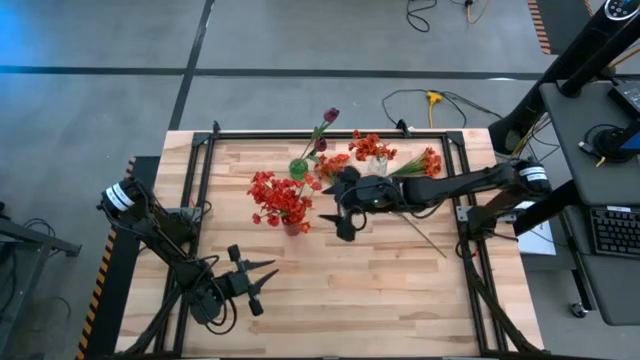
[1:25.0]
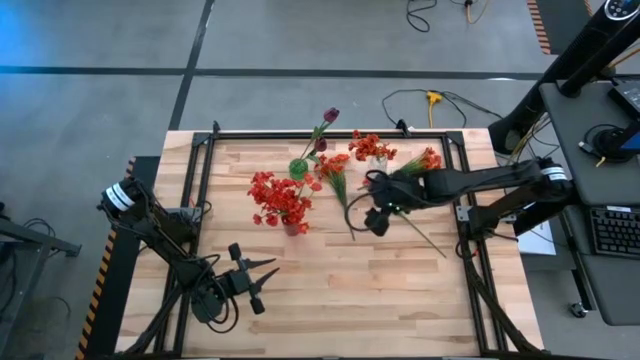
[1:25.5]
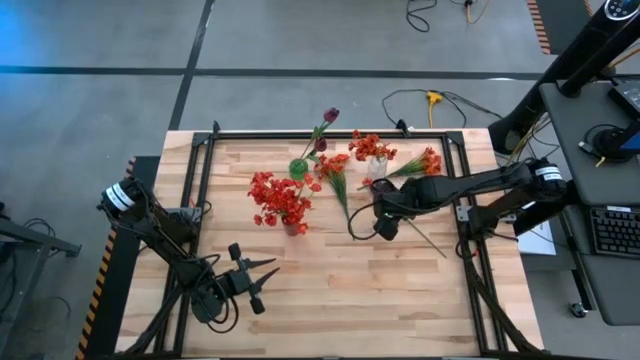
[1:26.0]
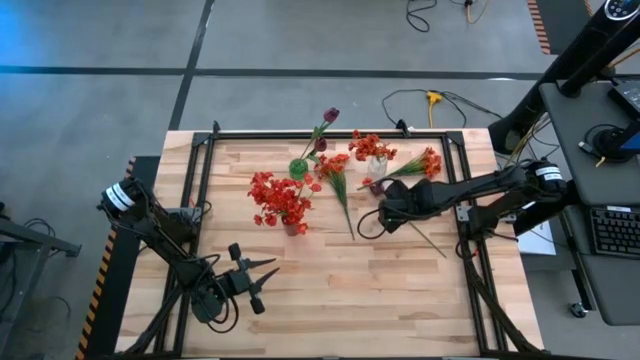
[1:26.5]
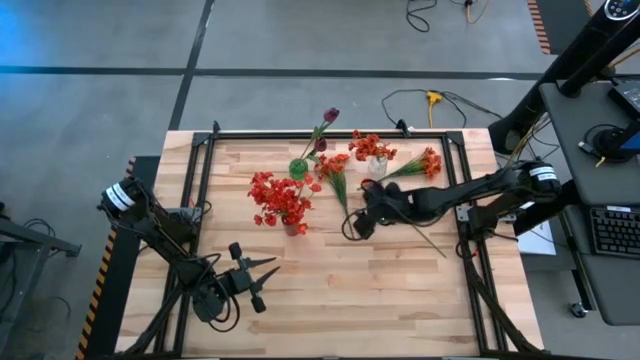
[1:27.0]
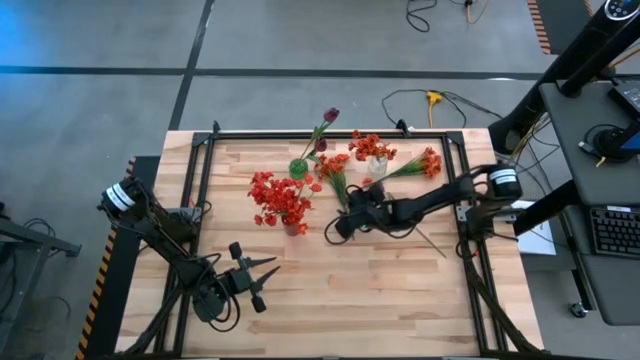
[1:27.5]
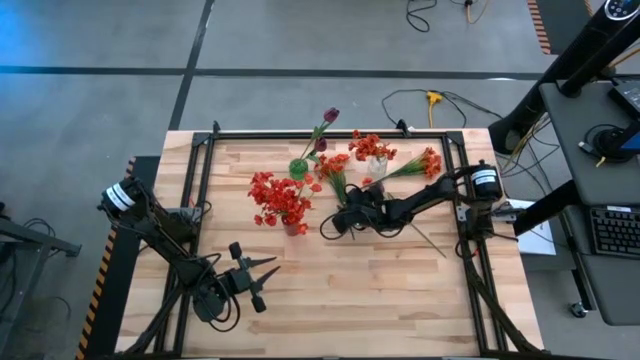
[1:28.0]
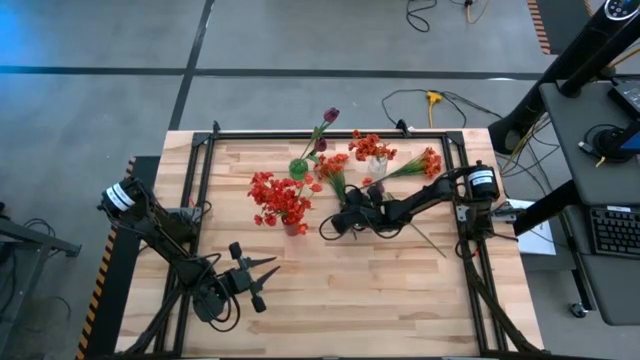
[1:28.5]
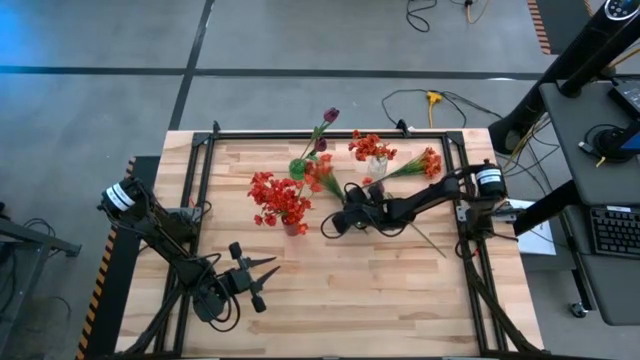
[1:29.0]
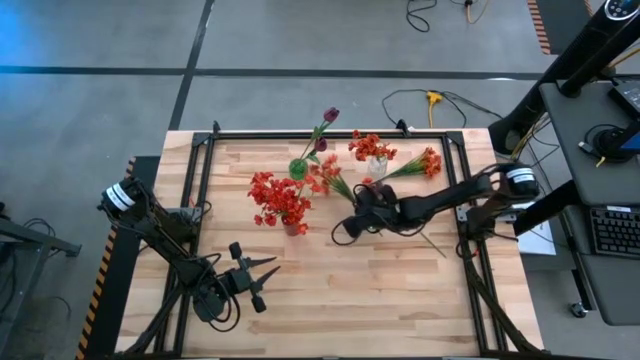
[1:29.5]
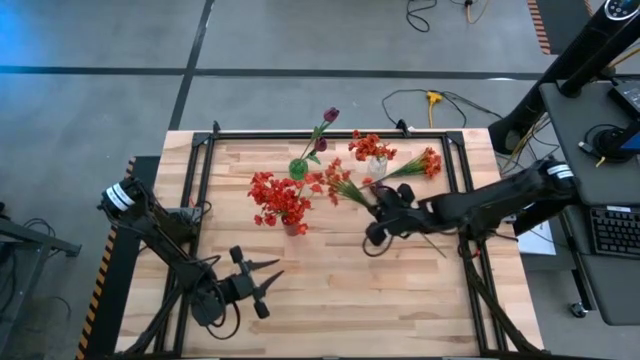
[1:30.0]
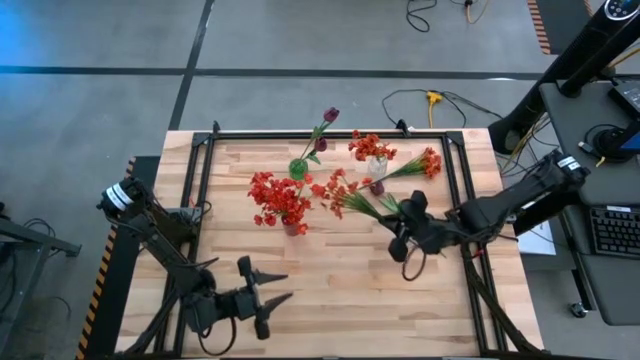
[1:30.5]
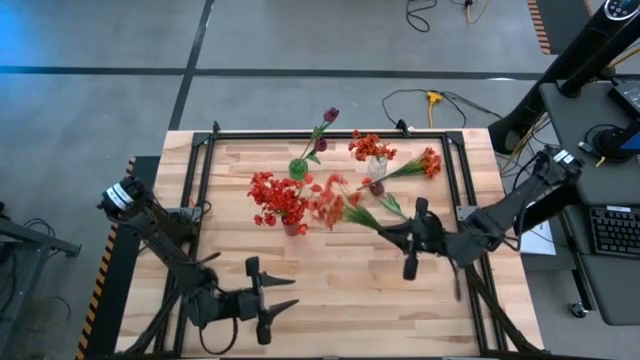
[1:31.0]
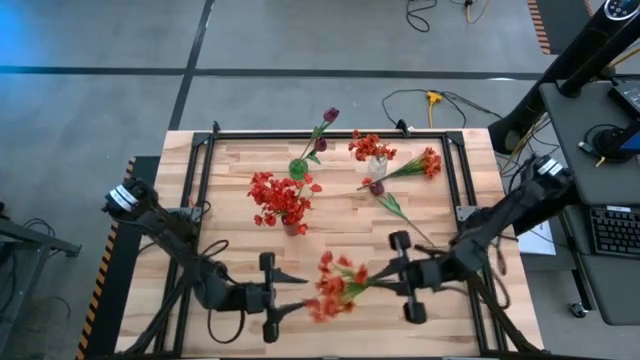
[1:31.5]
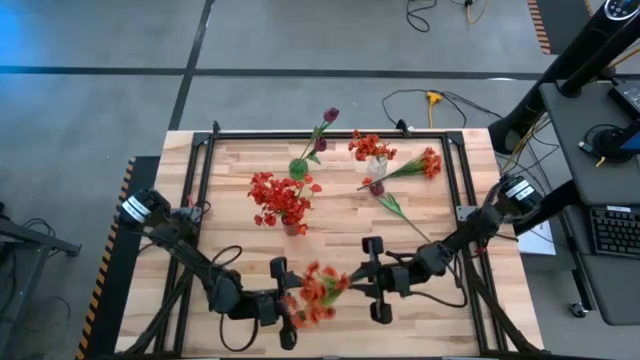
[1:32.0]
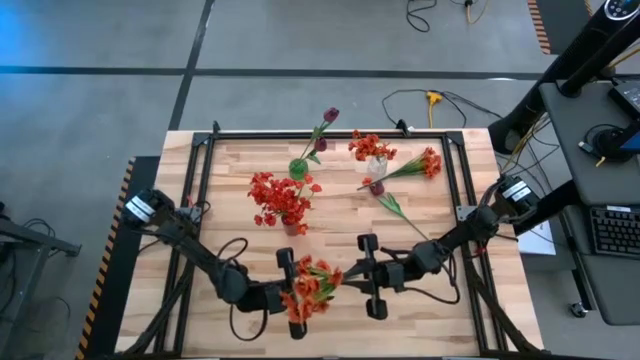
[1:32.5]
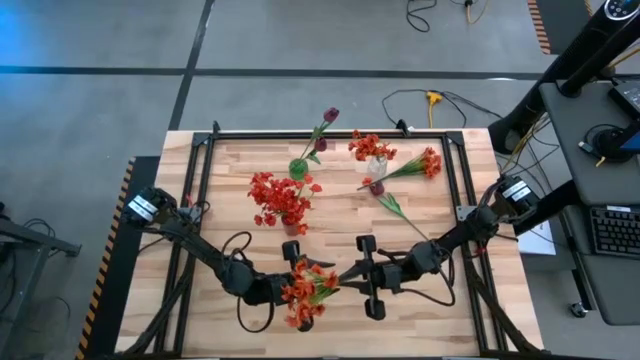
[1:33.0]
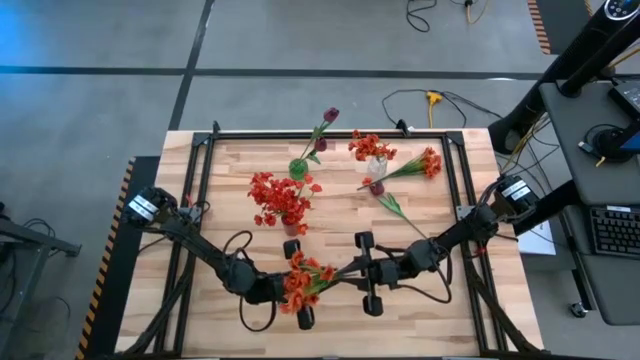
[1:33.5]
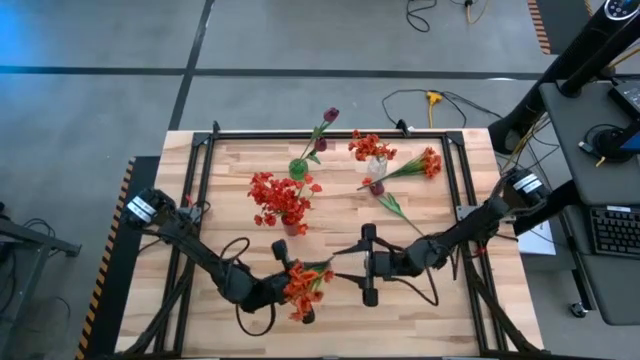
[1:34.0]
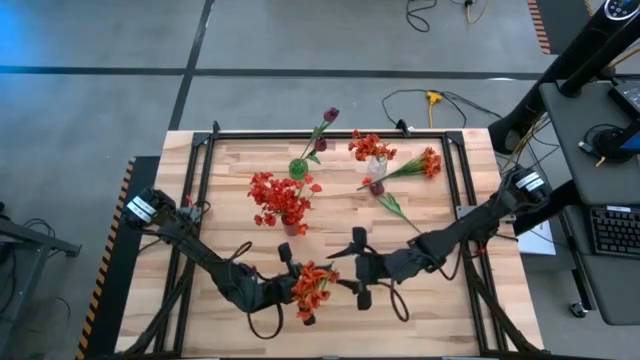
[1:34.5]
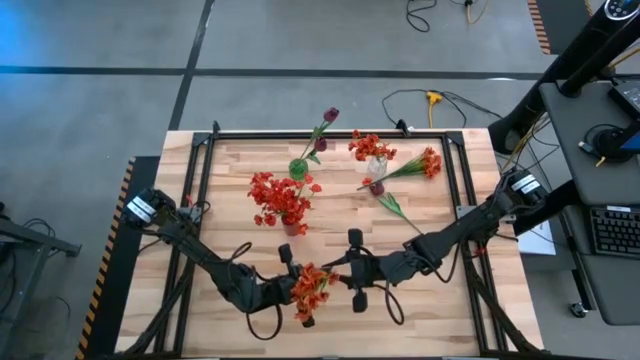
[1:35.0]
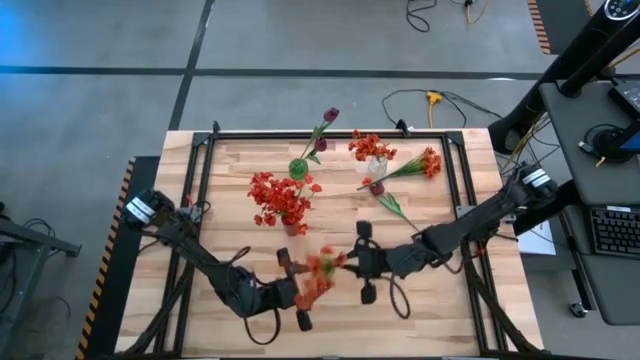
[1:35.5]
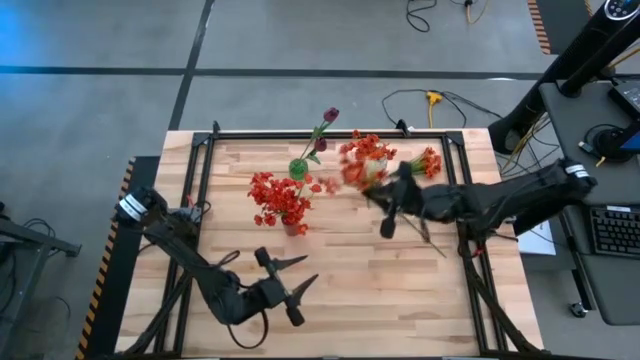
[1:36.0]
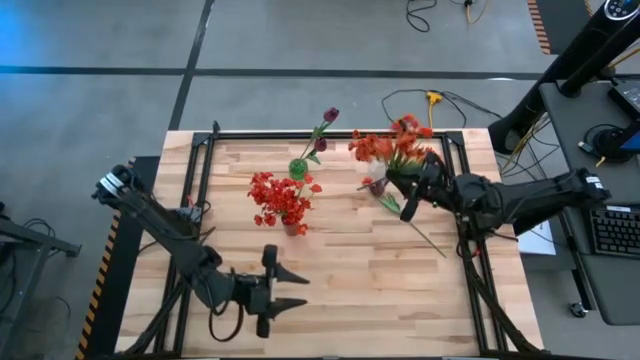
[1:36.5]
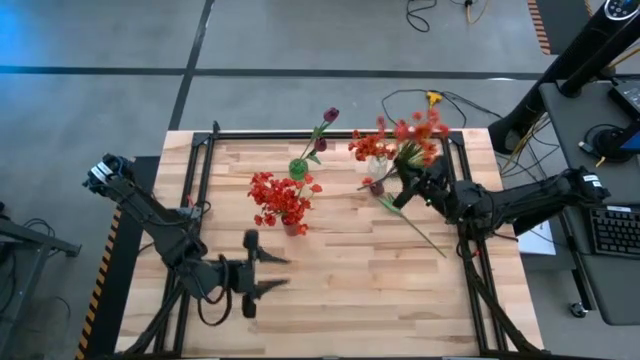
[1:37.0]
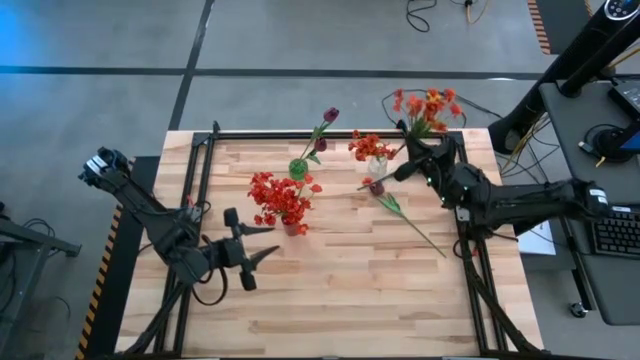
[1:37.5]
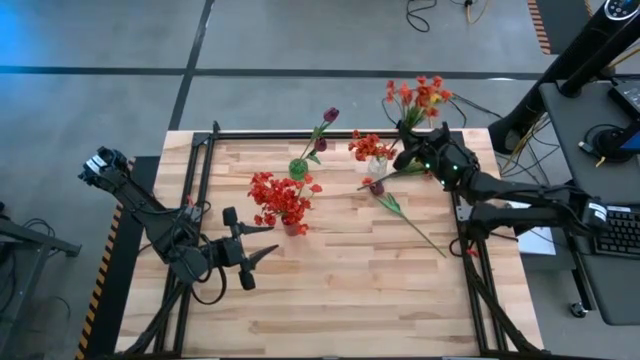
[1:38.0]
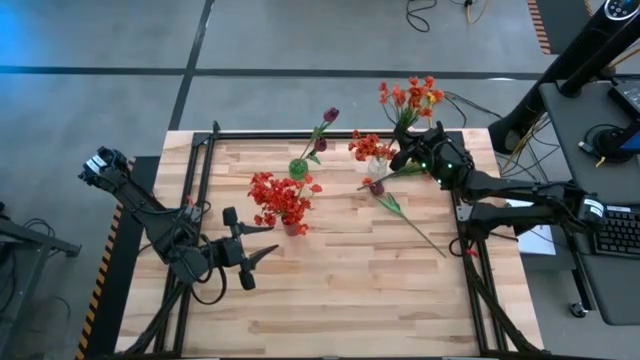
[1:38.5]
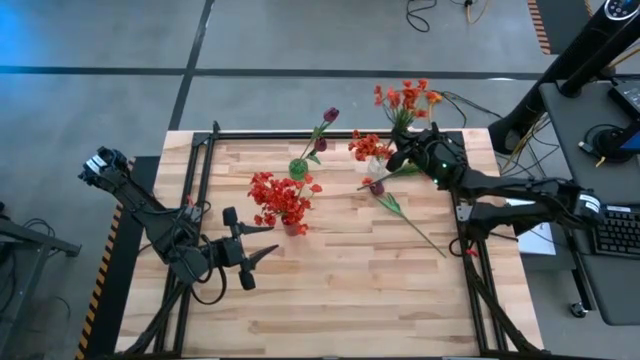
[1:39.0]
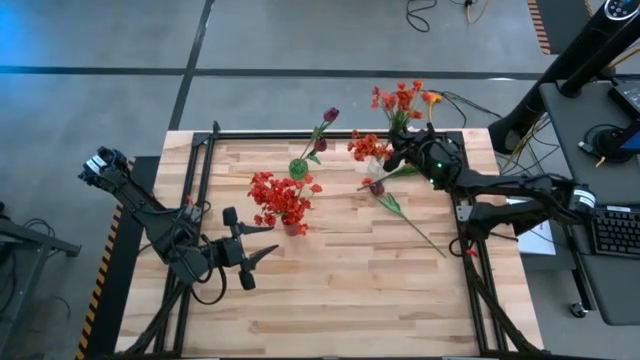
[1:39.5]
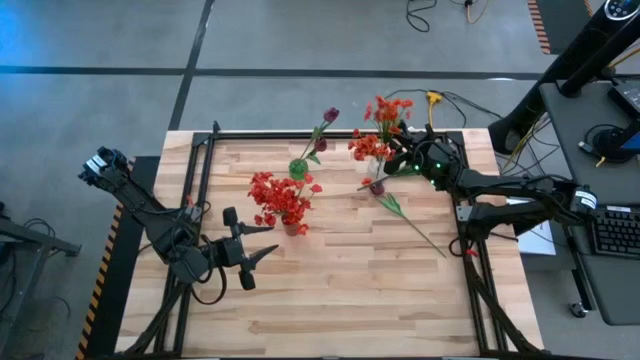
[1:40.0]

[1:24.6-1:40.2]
Task: Sort flowers into vase by color
Put the left orange flowers into the transparent vase

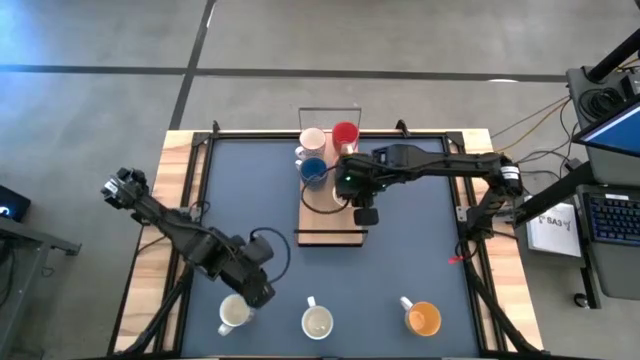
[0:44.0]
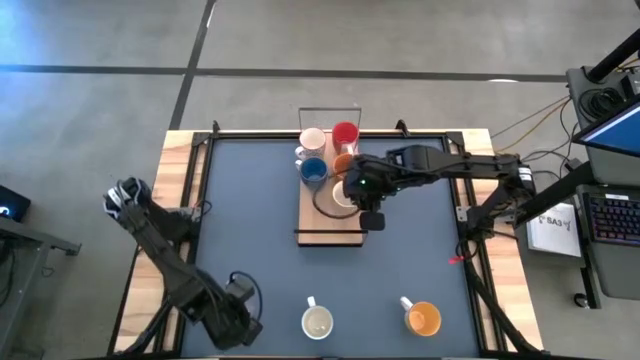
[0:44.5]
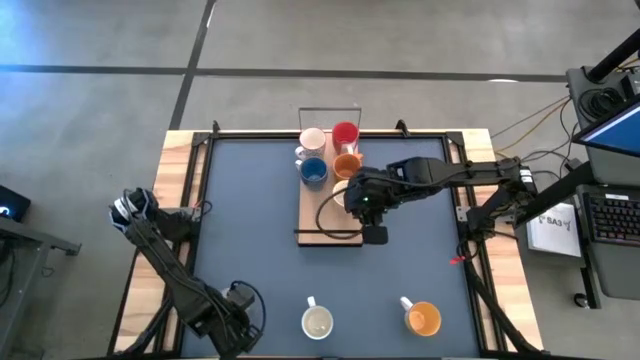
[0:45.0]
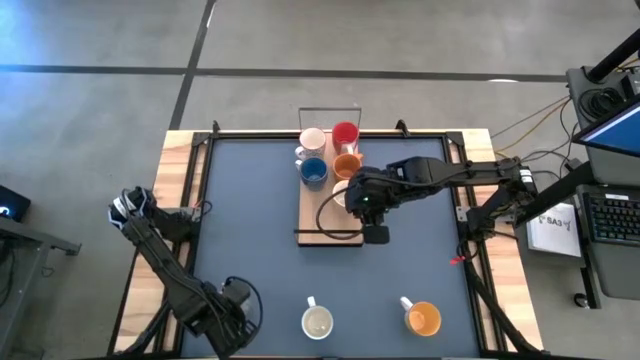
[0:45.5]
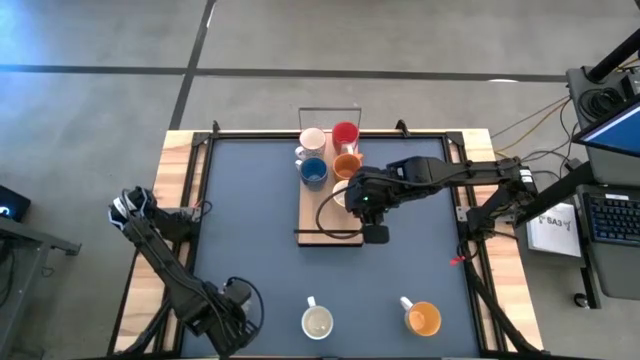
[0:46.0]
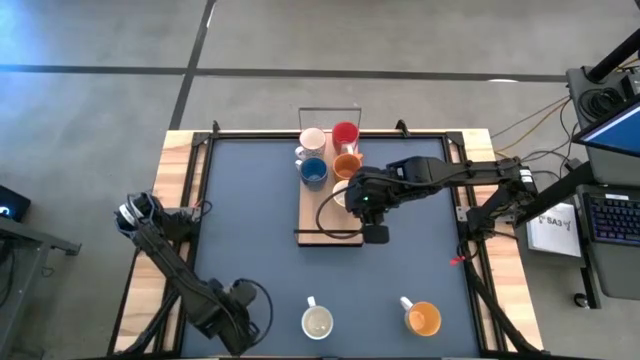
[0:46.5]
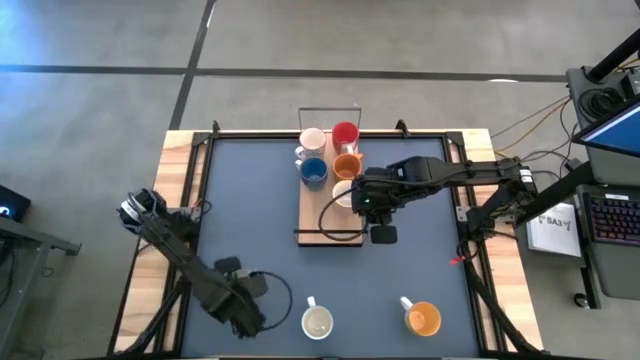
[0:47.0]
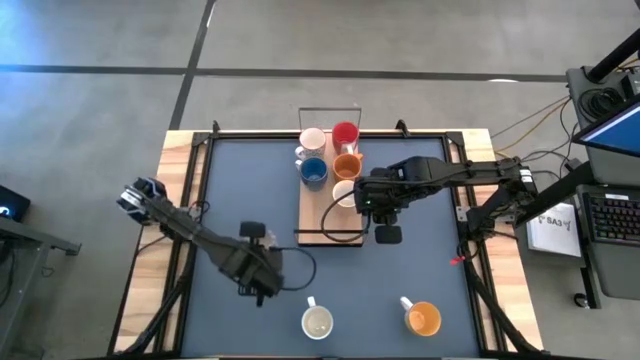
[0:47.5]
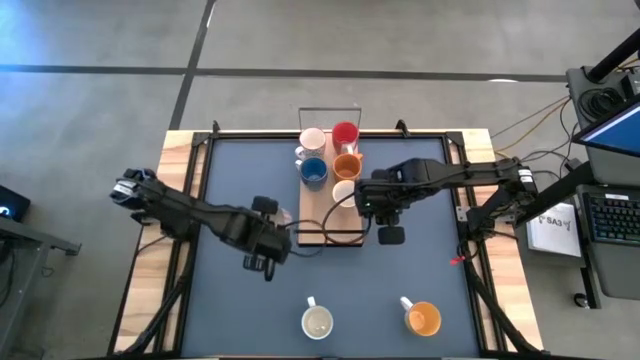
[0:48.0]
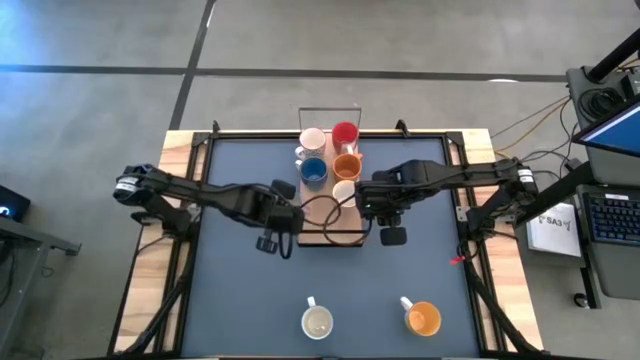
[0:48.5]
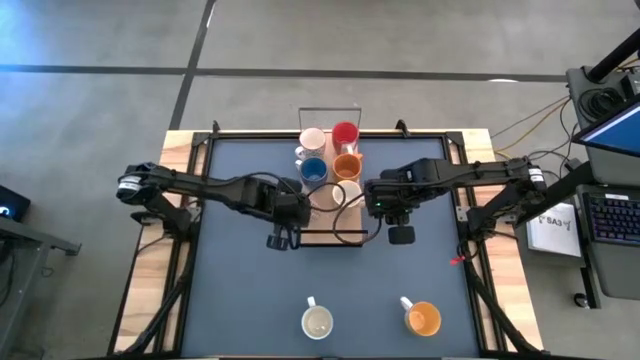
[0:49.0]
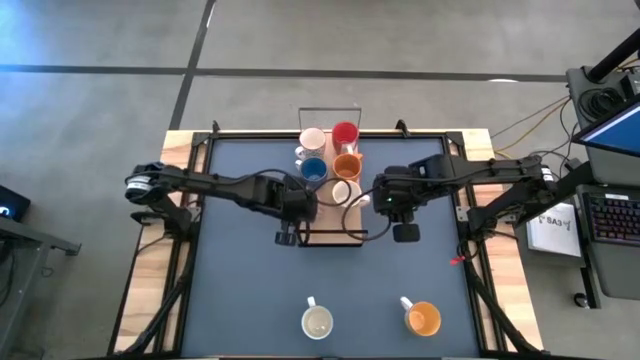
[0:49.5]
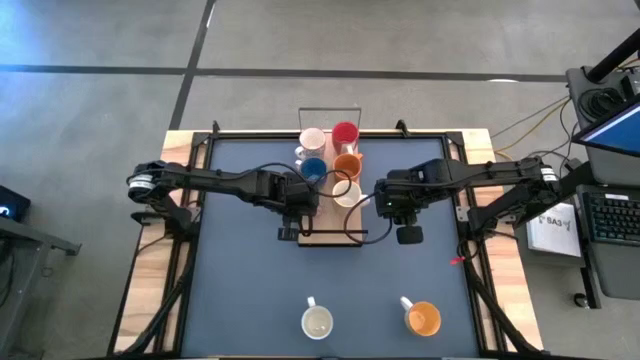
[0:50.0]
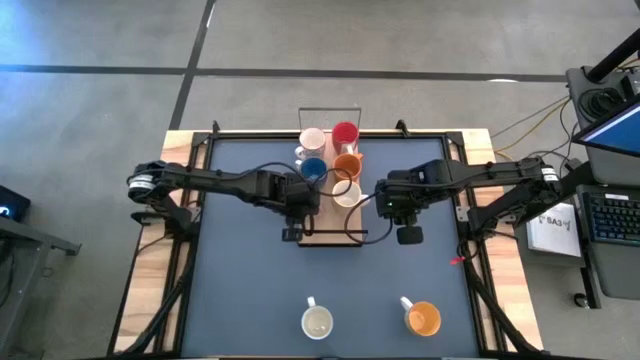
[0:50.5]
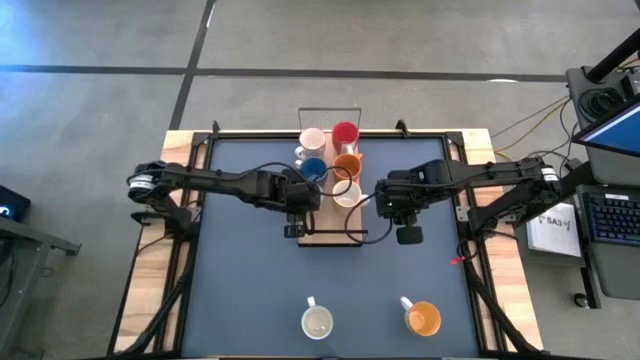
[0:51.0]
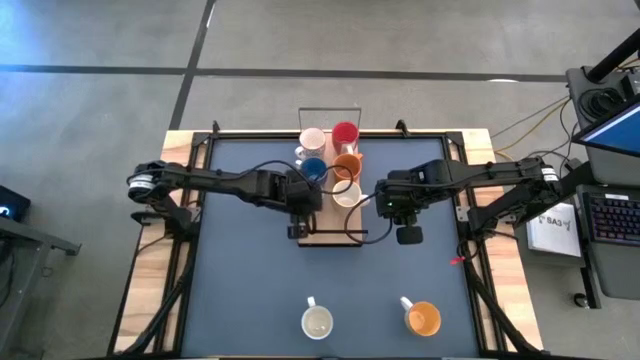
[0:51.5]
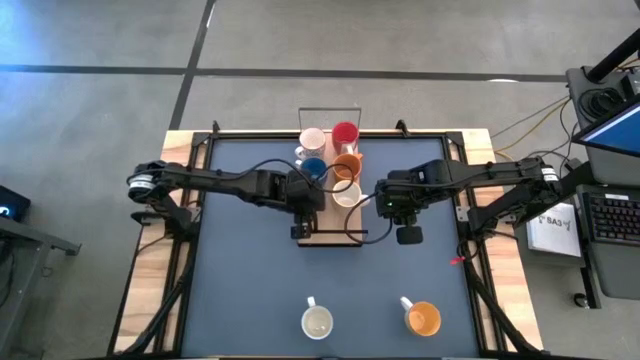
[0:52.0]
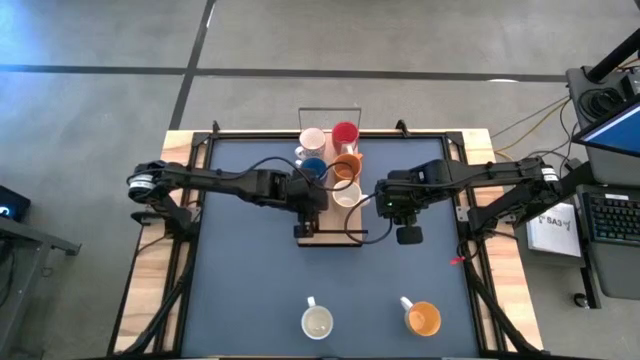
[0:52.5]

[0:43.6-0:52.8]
Task: Place coffee mugs
Put the red patterned mug on the shelf
